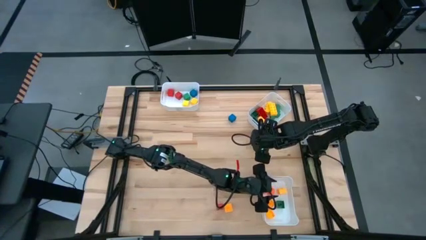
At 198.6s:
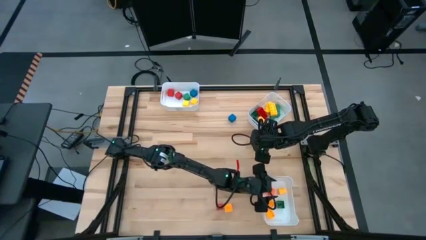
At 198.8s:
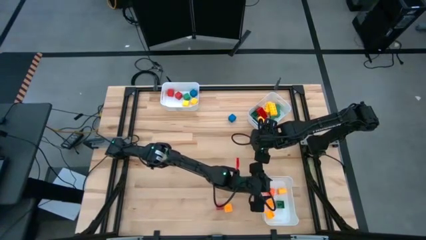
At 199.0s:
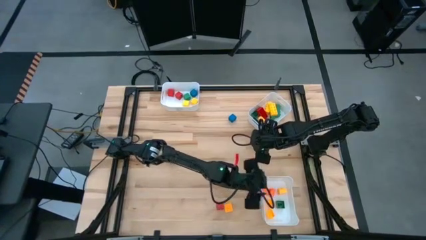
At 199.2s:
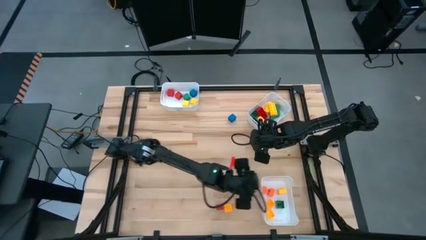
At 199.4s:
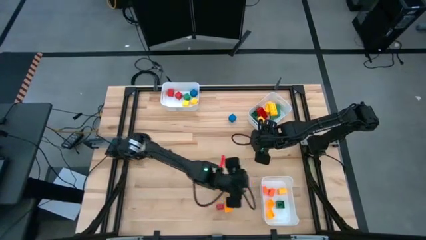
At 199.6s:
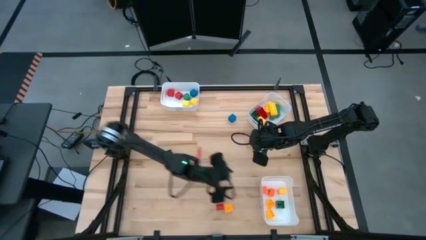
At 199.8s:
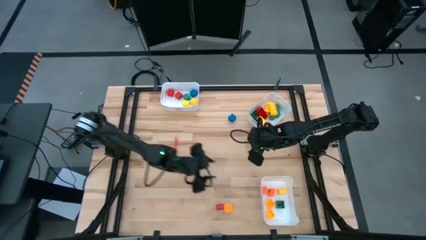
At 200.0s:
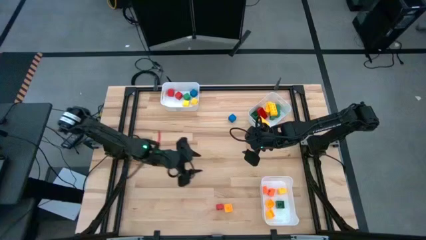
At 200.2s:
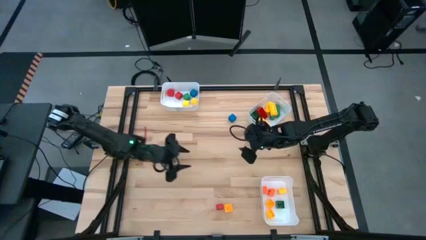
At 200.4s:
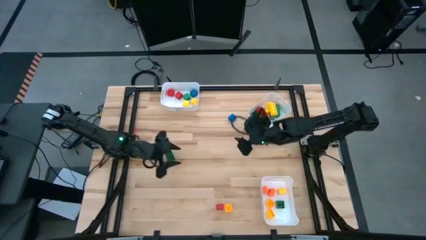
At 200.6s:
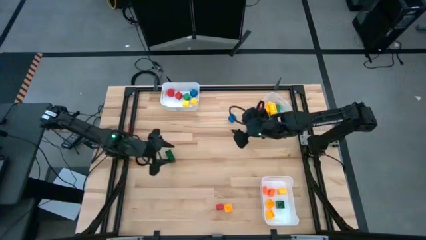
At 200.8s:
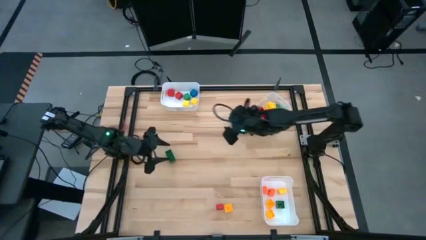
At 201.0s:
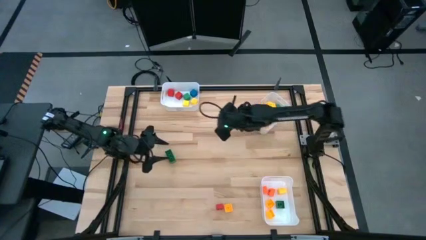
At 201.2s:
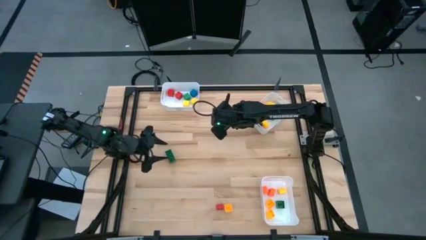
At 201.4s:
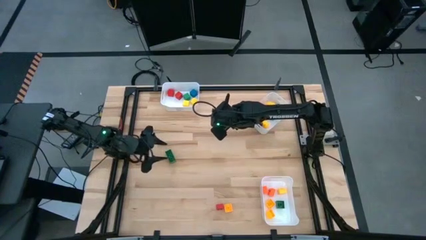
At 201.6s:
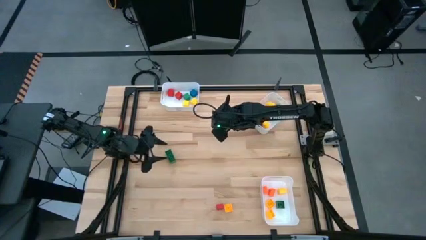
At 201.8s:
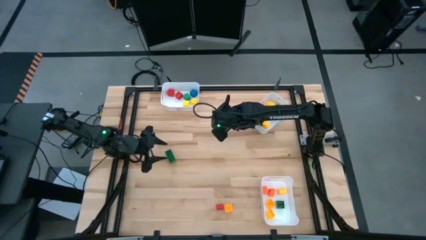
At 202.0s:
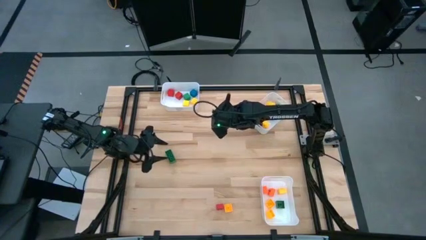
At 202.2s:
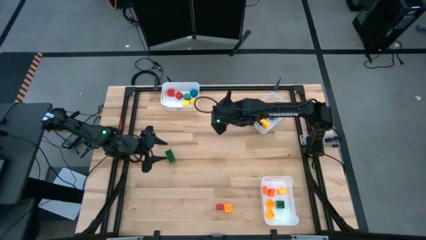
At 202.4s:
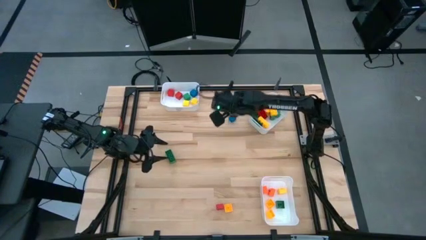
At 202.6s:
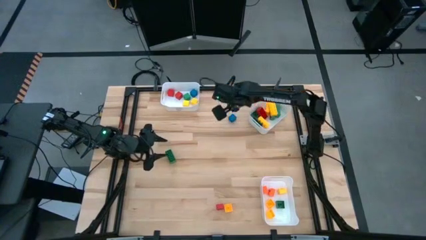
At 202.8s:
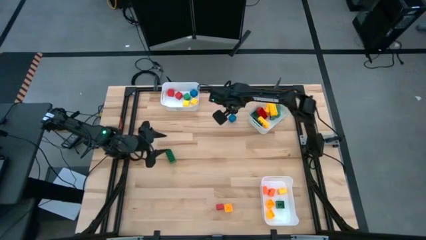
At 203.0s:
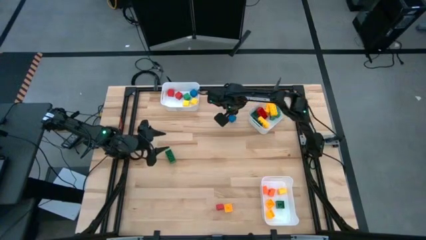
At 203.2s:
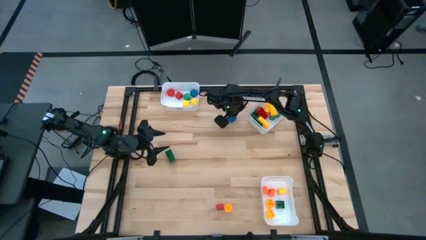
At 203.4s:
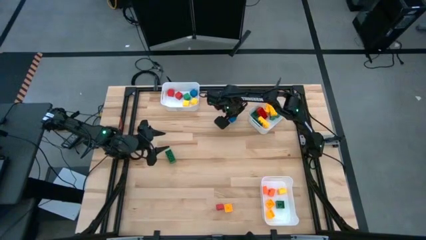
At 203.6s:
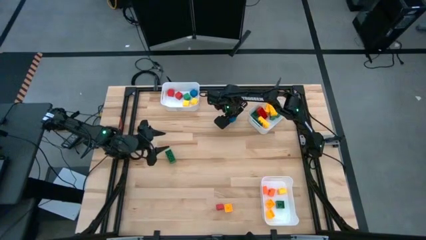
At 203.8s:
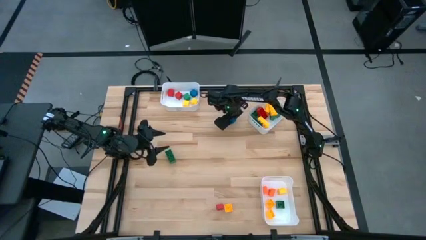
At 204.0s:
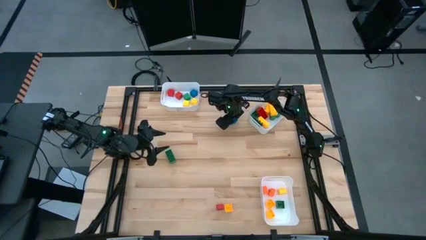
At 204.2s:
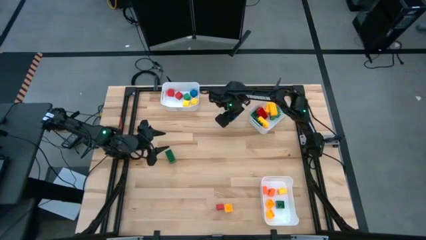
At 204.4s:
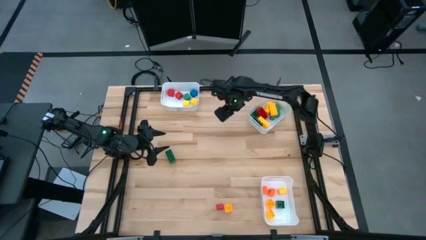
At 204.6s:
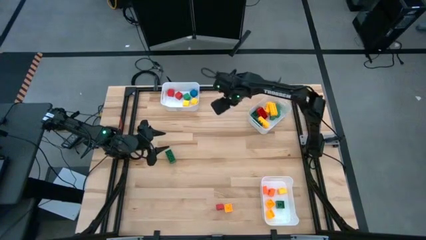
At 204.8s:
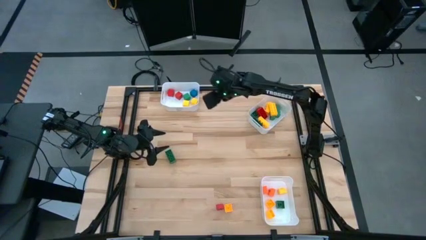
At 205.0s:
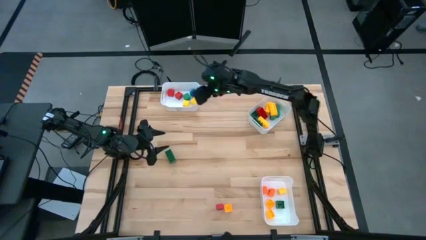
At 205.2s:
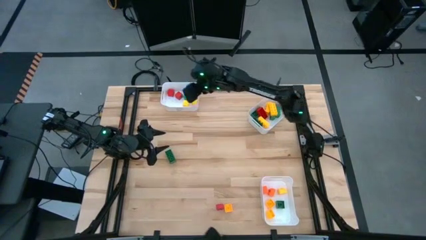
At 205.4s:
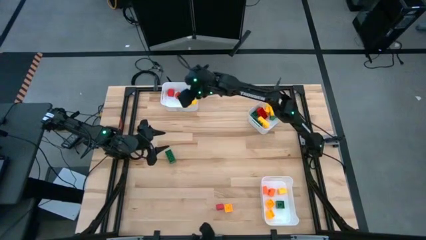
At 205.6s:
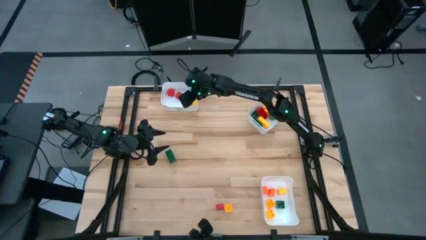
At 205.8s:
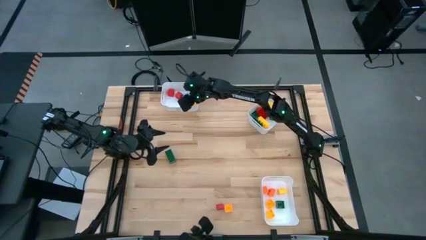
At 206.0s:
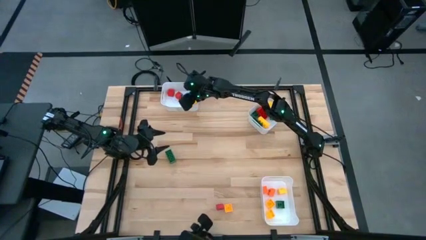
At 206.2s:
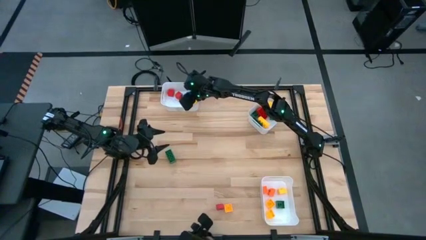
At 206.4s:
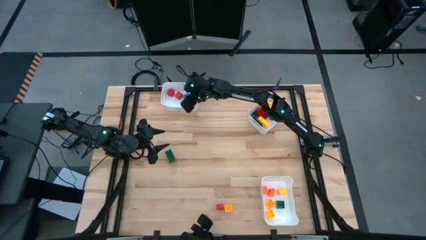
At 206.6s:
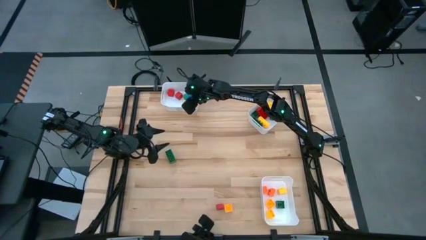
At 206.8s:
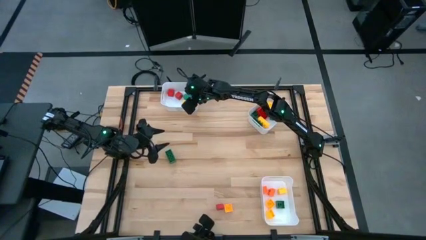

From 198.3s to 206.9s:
Task: Sort blocks by size
Put the blue square block into the top left white bin

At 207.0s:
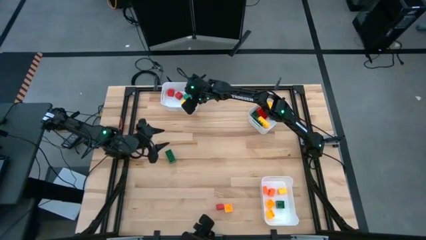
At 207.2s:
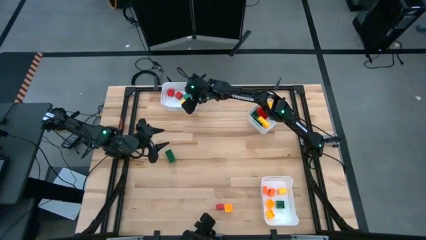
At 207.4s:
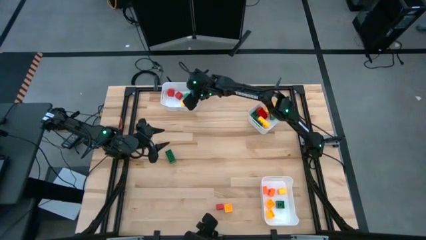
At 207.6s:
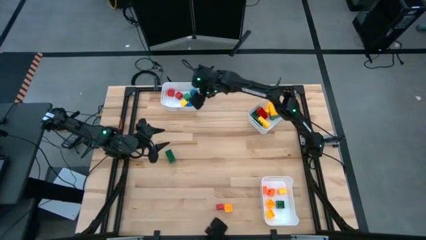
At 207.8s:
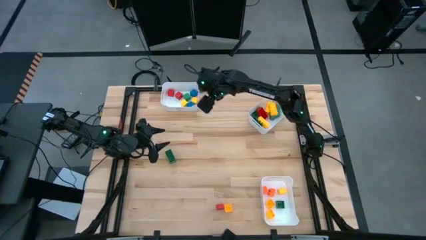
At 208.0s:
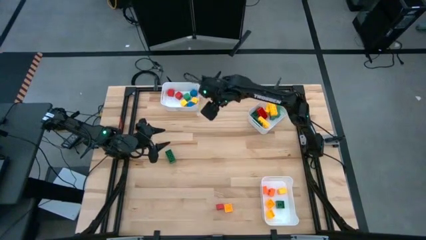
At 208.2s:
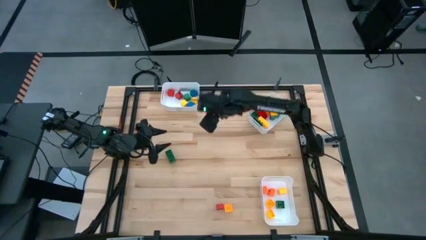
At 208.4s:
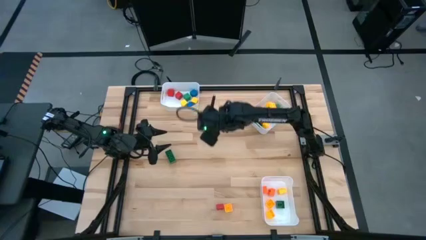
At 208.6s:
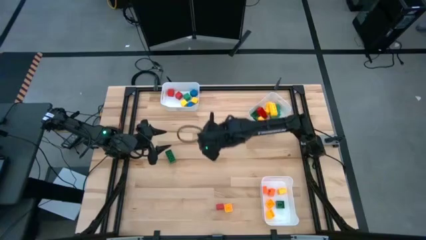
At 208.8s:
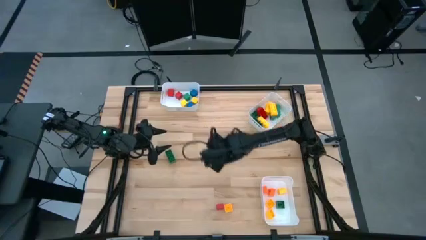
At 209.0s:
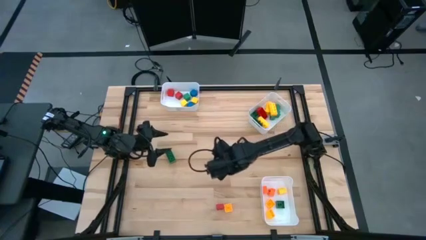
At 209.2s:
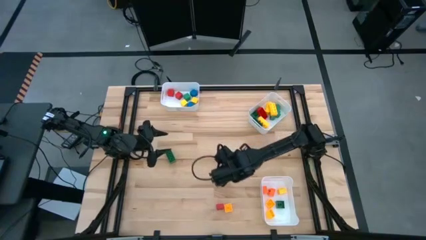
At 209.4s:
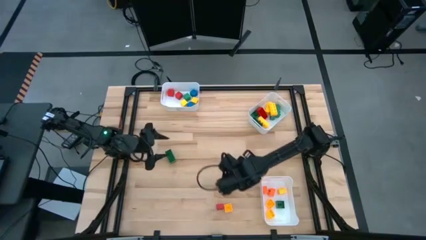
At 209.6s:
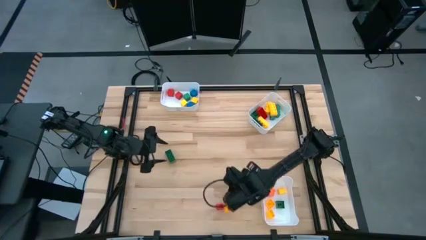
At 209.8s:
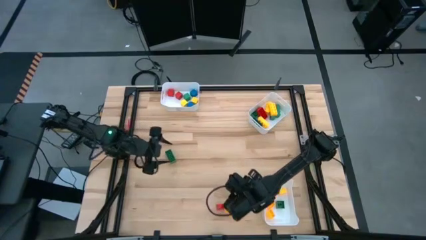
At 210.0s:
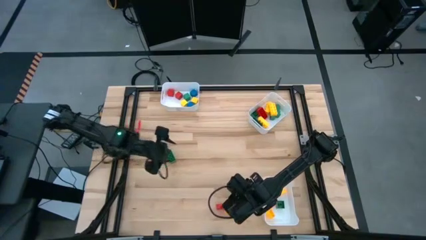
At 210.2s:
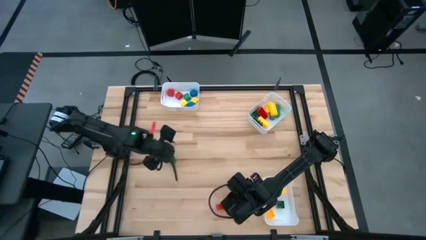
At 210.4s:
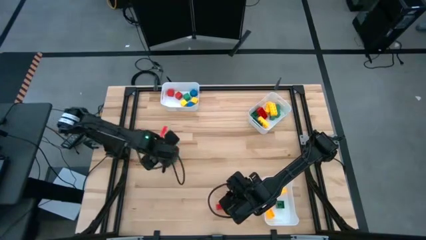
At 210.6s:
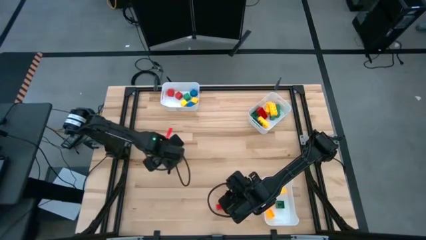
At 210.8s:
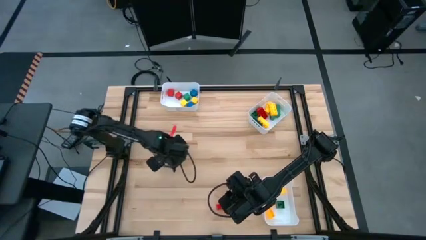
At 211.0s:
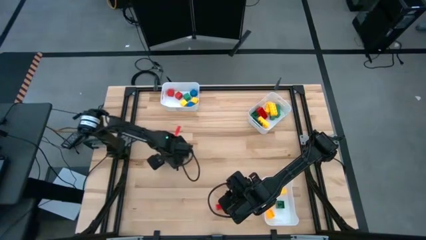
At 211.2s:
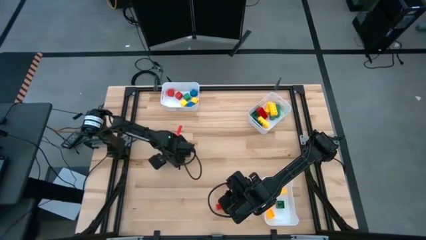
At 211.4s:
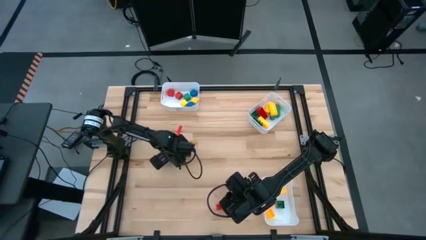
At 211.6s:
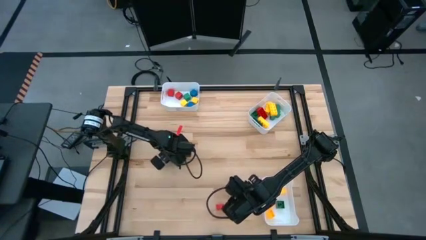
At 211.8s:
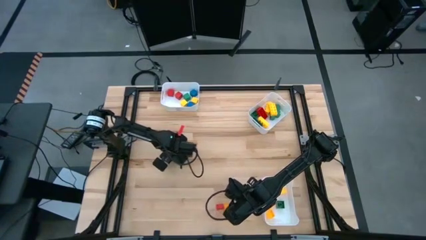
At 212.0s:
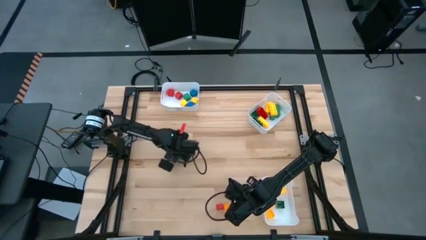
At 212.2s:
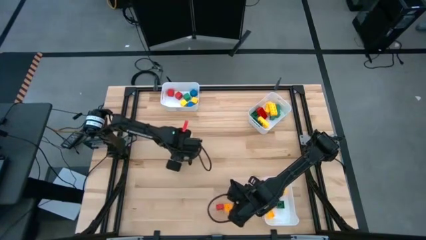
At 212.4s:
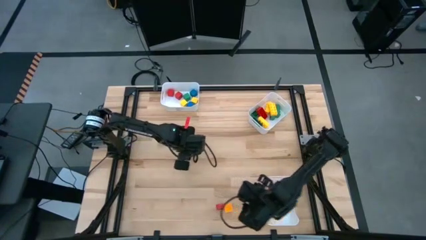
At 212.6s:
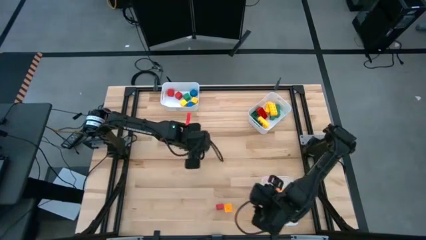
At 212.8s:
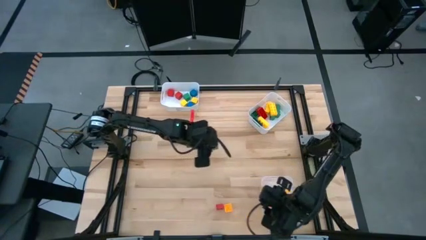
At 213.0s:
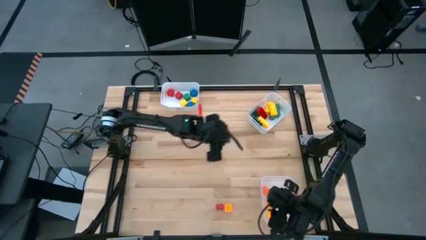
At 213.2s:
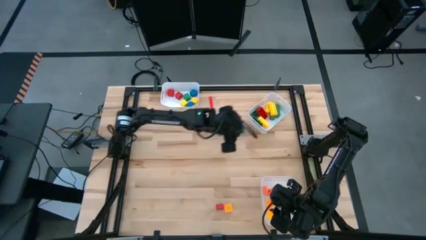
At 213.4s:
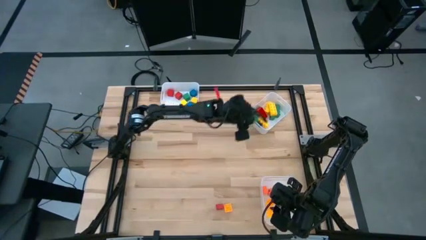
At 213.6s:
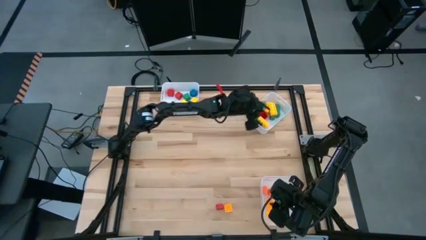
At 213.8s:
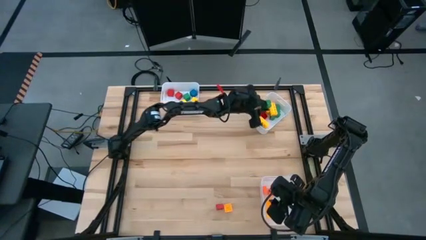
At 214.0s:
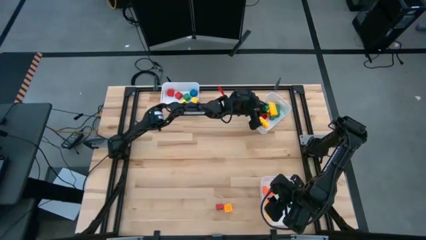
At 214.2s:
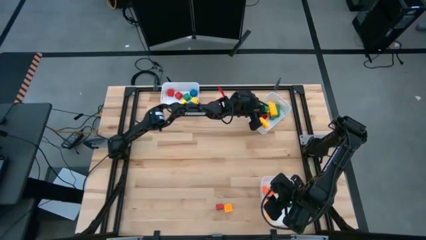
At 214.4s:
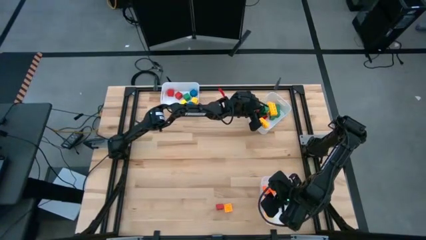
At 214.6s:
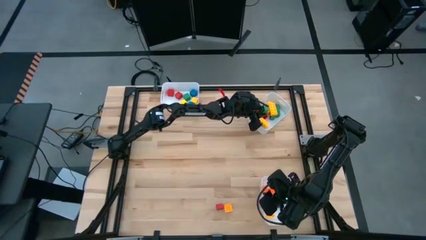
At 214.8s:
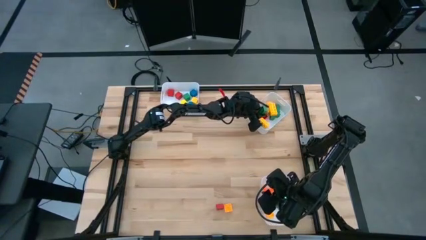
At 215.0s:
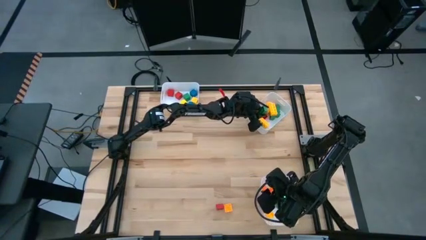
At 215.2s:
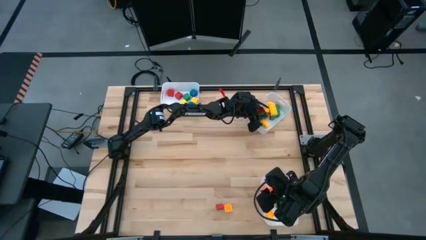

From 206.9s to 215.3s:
Put the green 8 stud gamepiece into the top right white bin
